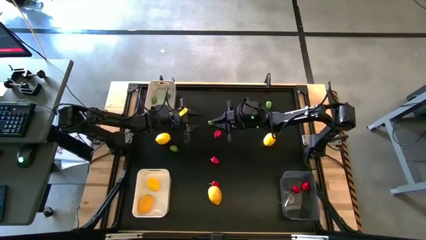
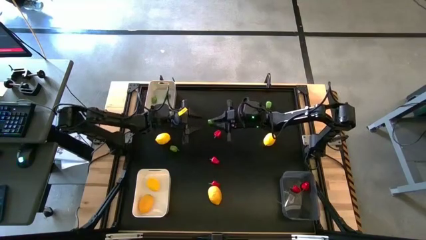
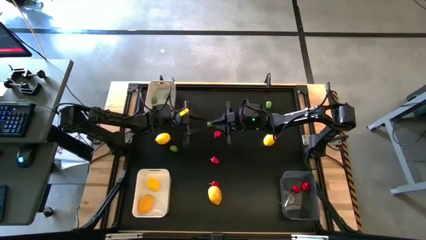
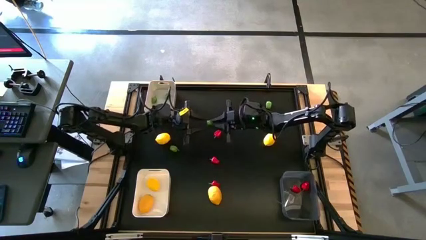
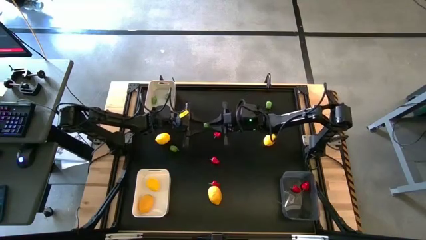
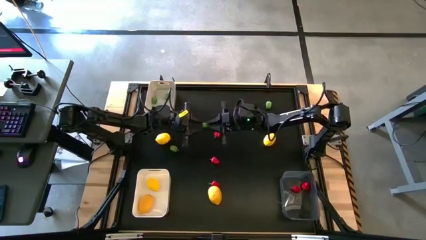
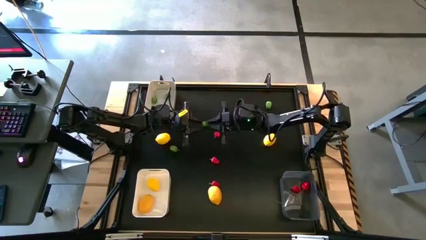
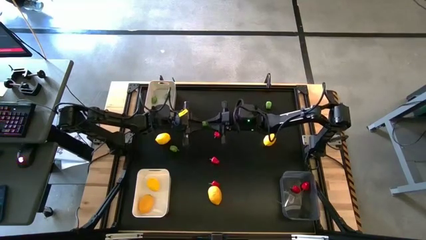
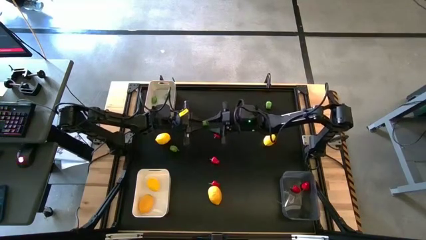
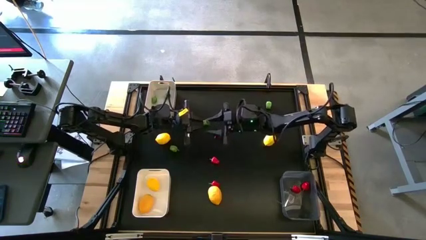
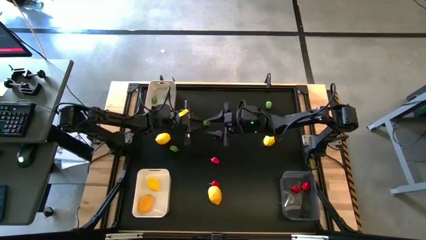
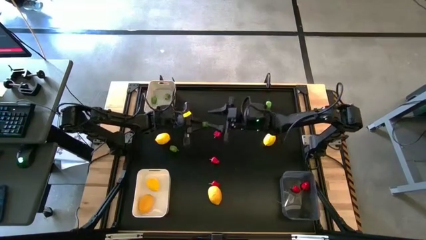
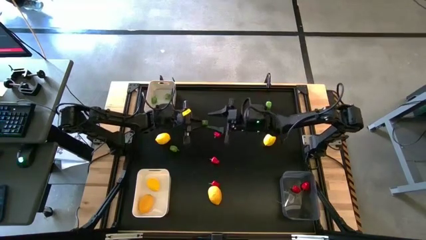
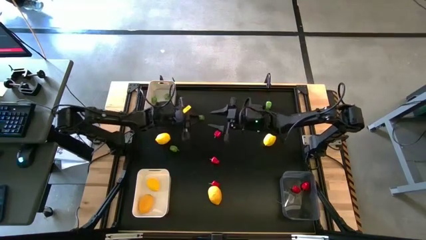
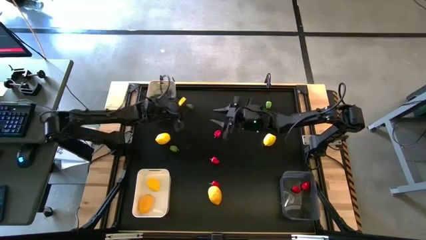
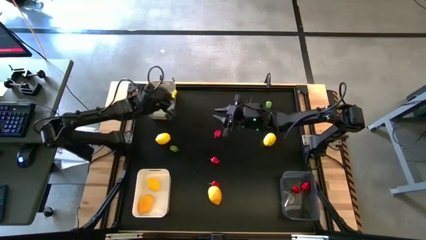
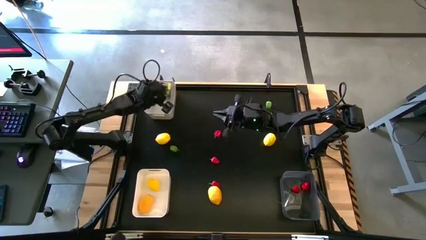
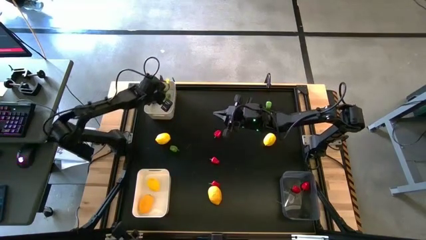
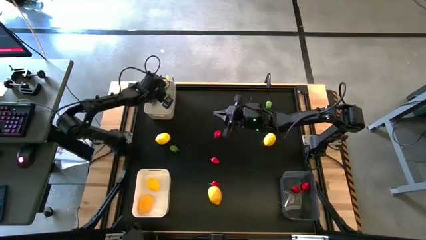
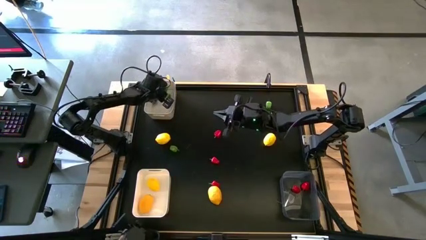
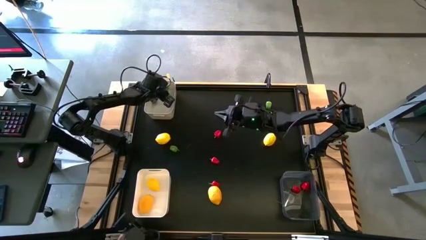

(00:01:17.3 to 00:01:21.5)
Task: Sort produce into baskets
Put the green chili pepper into the gray bin

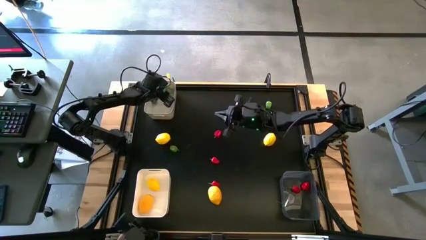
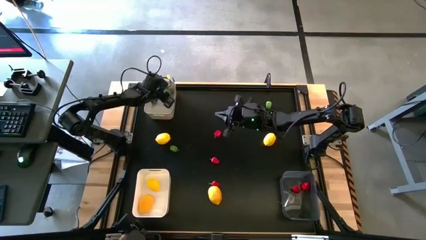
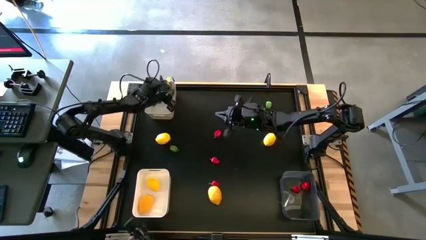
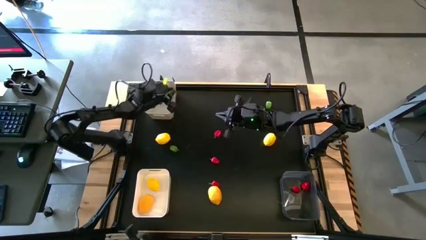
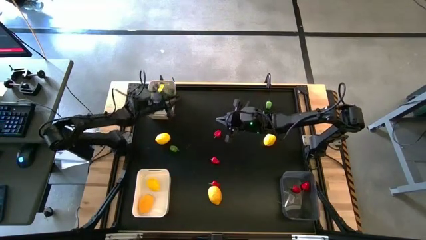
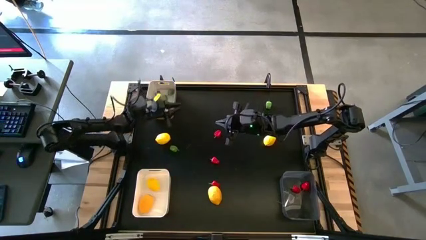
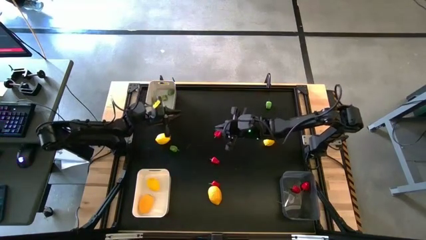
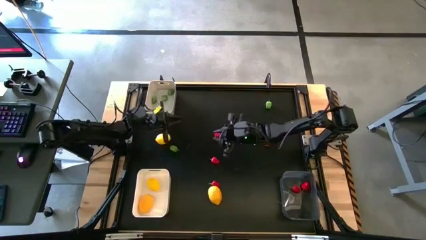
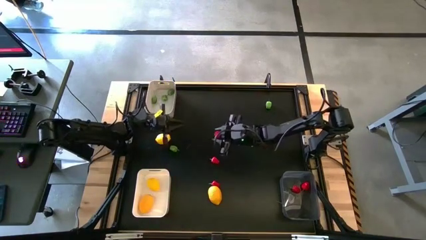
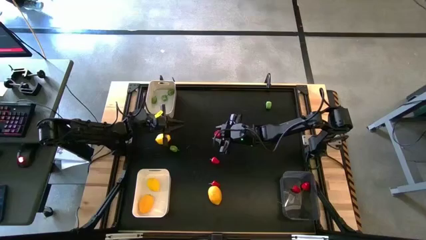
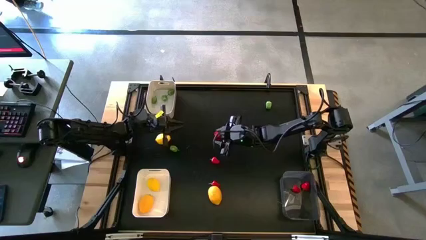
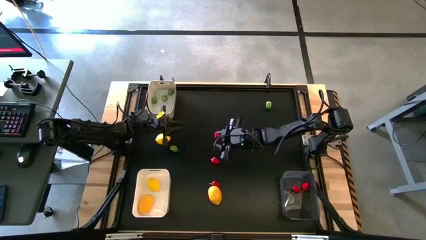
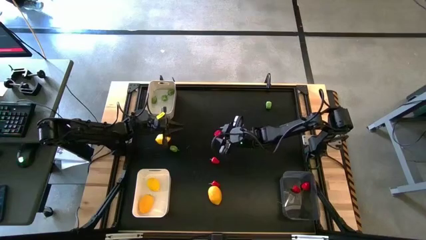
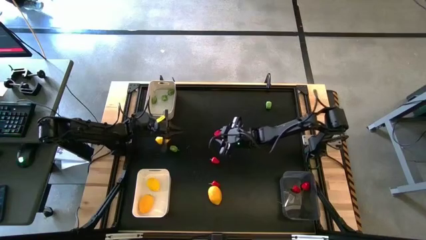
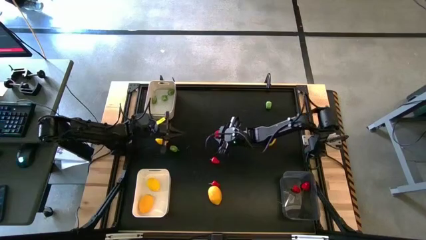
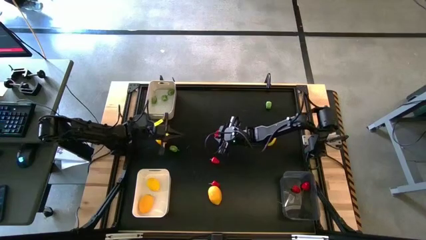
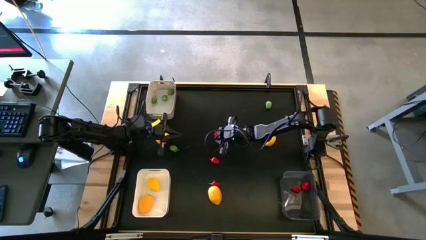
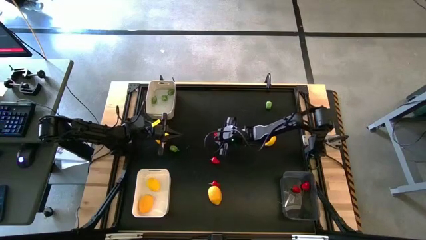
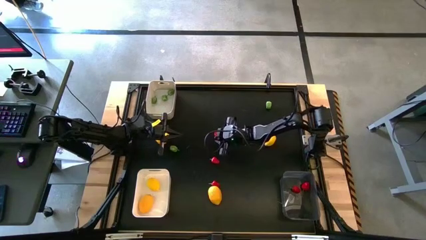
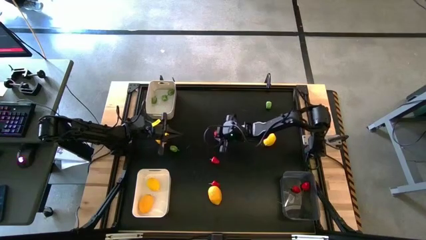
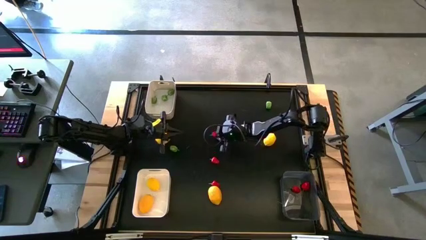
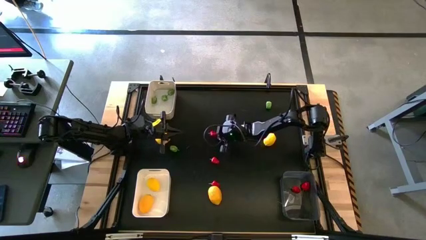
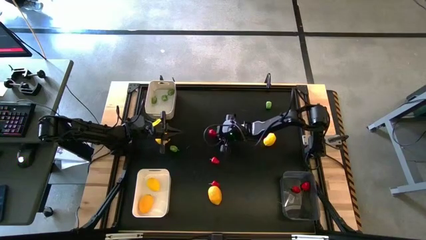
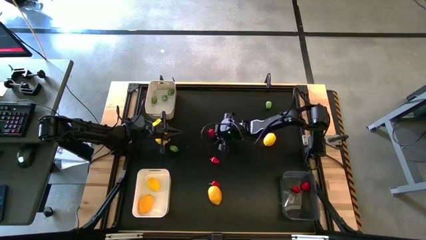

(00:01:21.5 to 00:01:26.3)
Put the red chili pepper into the black transparent bin

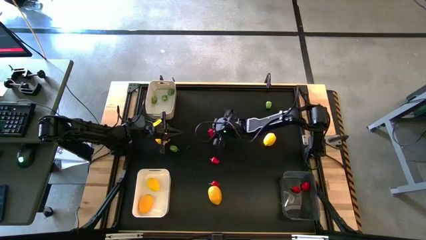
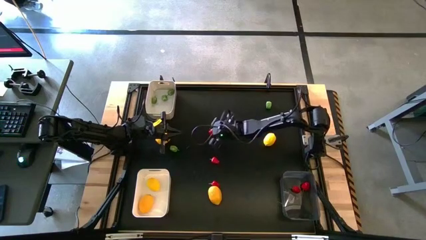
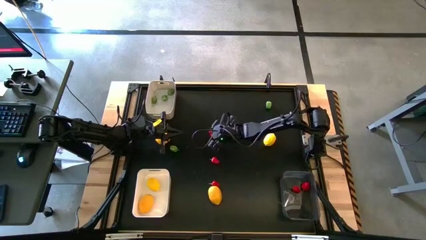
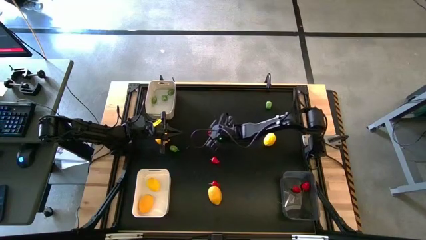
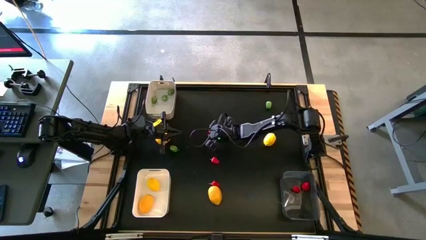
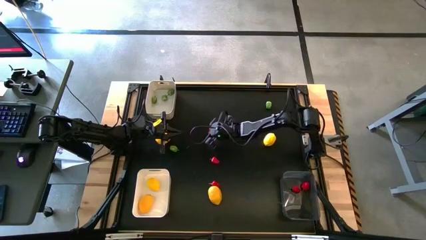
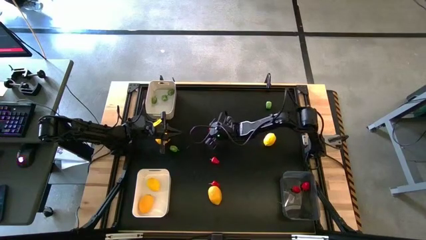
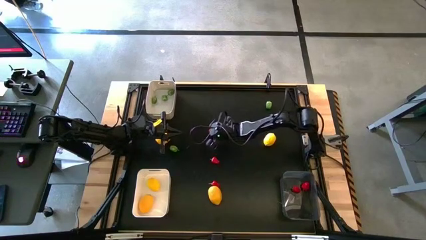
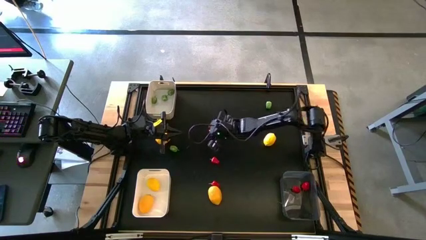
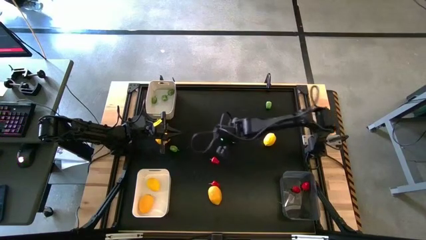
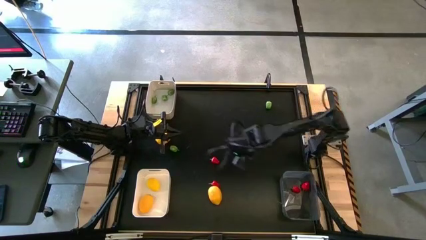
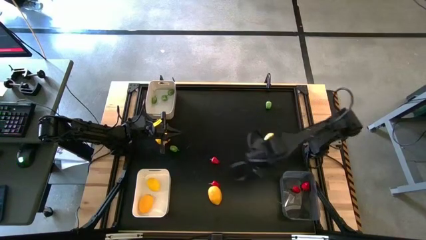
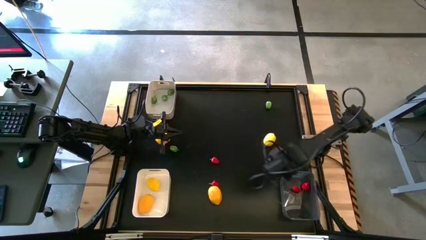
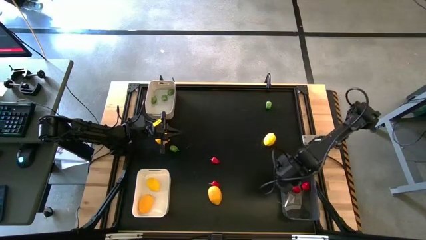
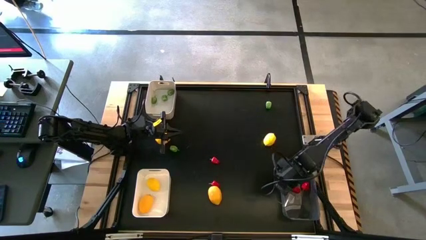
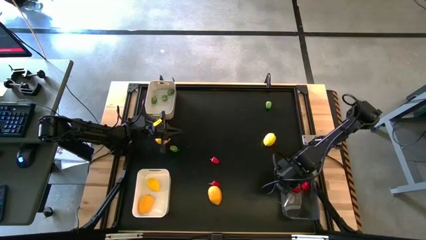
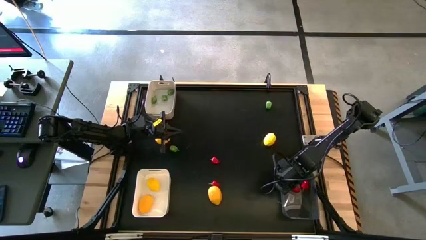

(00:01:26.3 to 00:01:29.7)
Put the red chili pepper into the black transparent bin

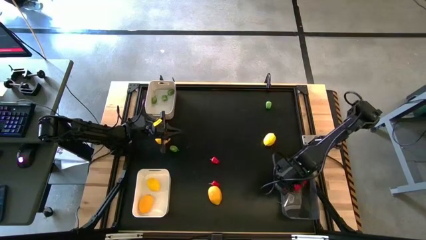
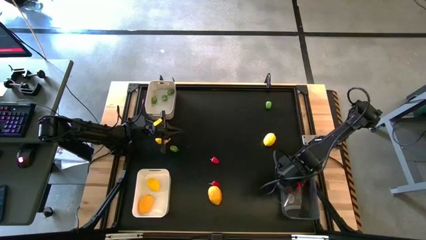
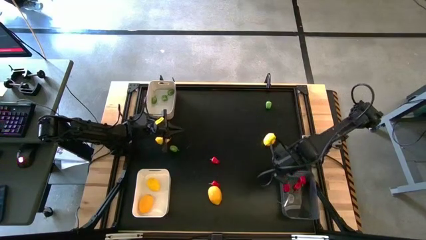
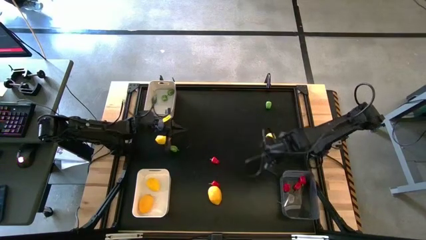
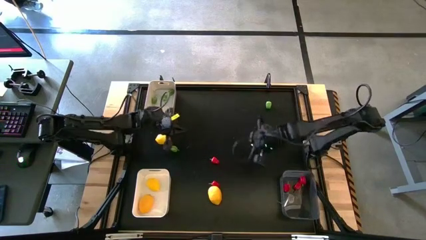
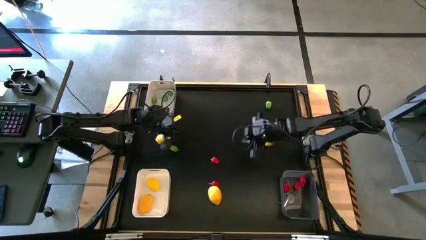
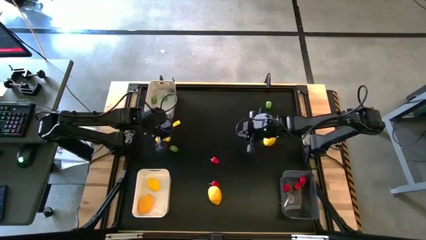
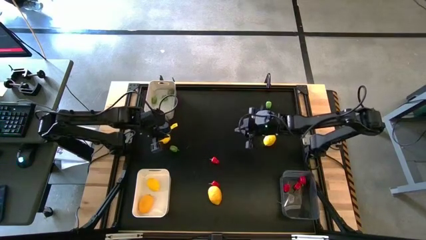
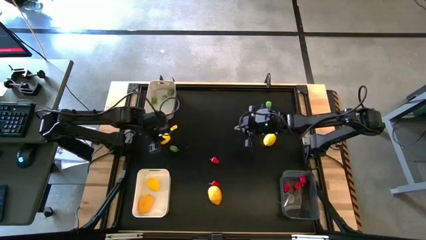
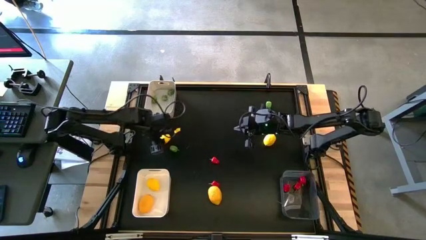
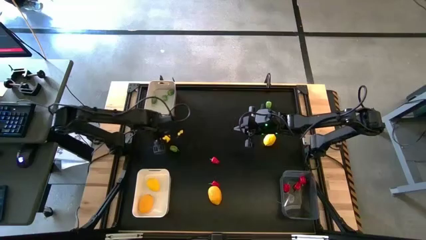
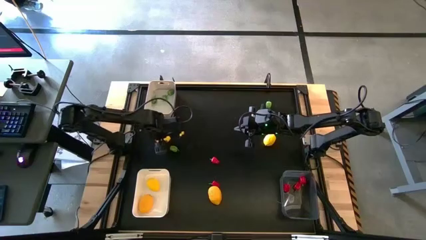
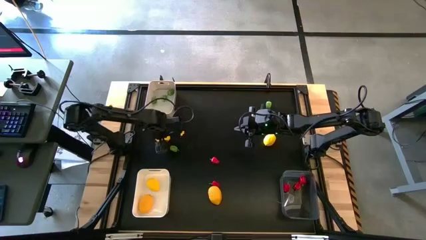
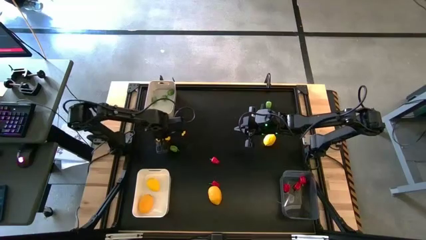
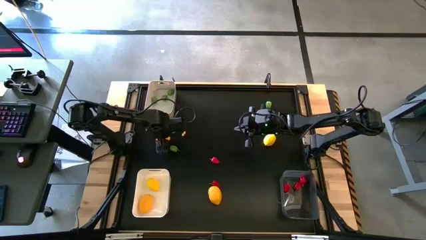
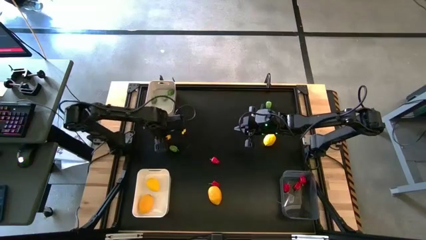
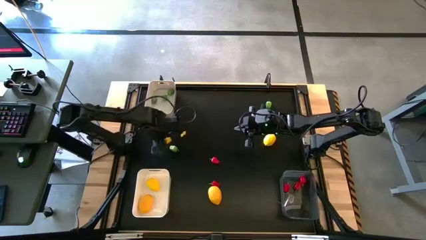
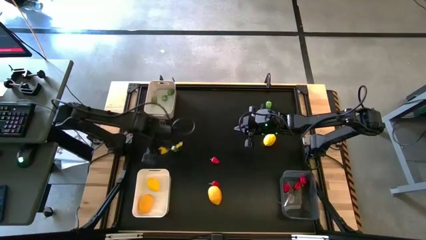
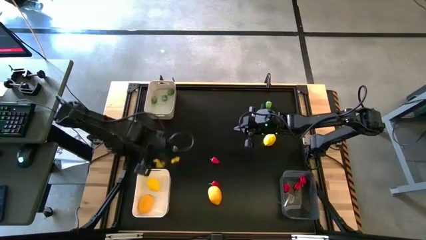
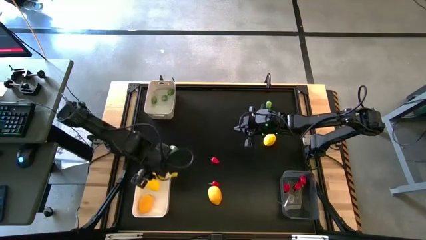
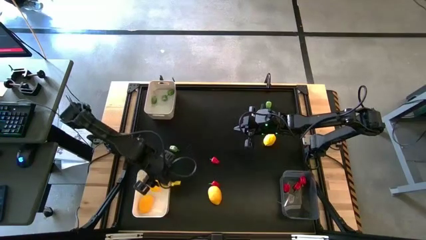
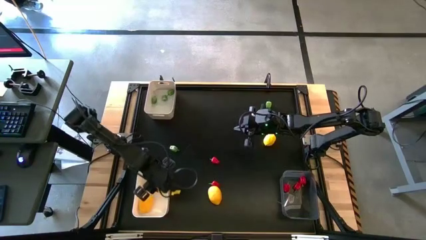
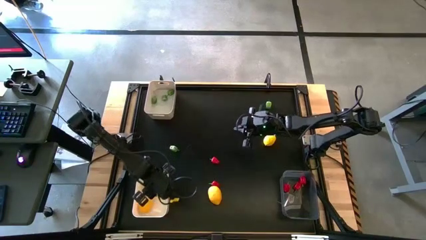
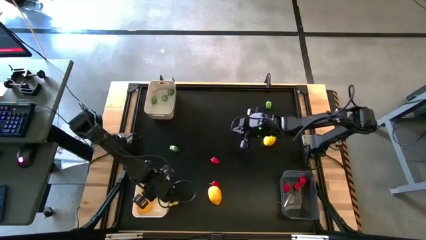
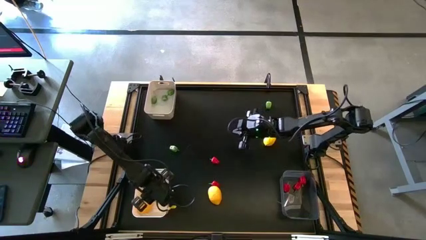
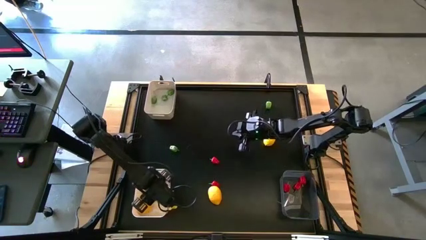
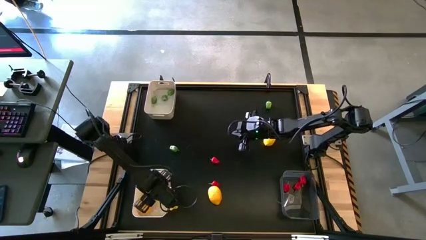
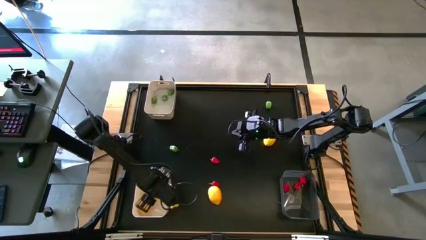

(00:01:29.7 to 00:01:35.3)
Put the yellow lemon into the white bin
